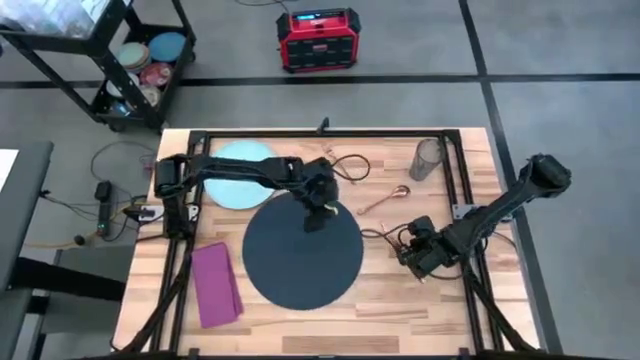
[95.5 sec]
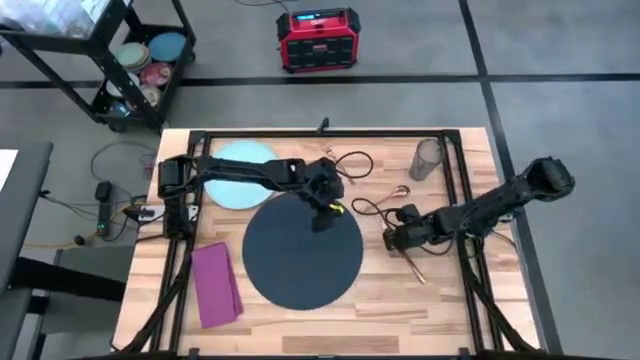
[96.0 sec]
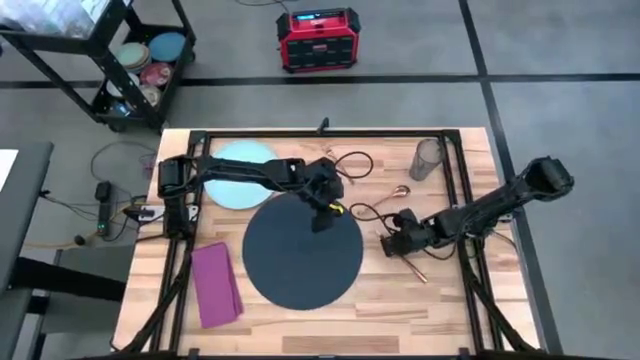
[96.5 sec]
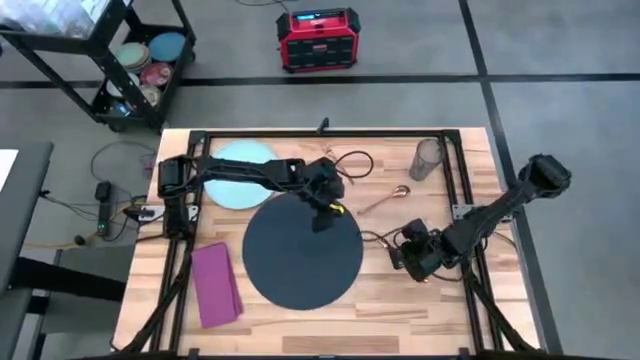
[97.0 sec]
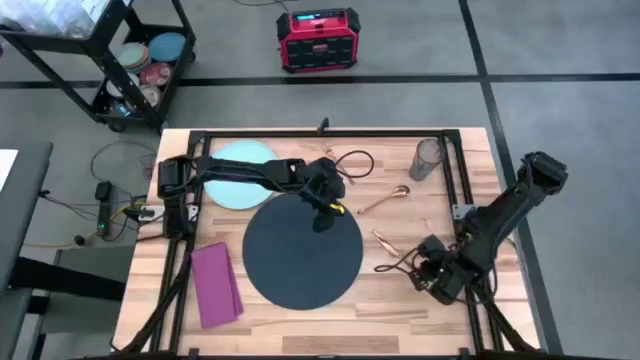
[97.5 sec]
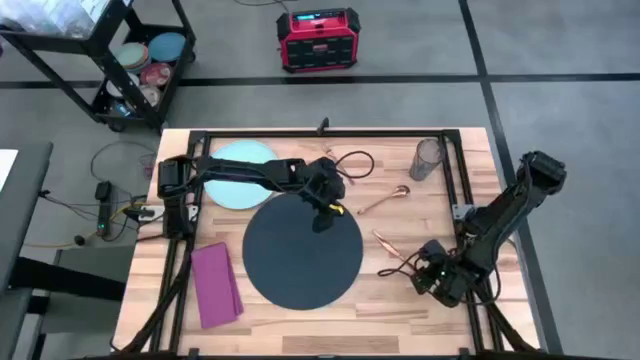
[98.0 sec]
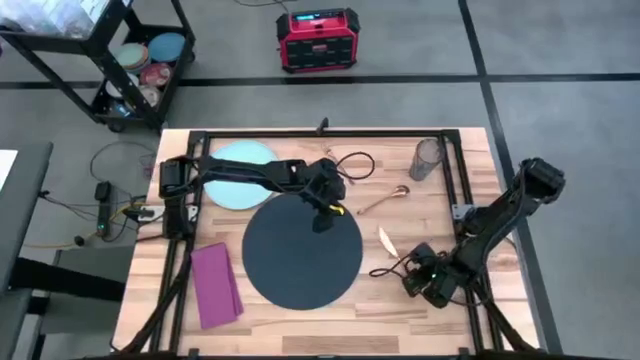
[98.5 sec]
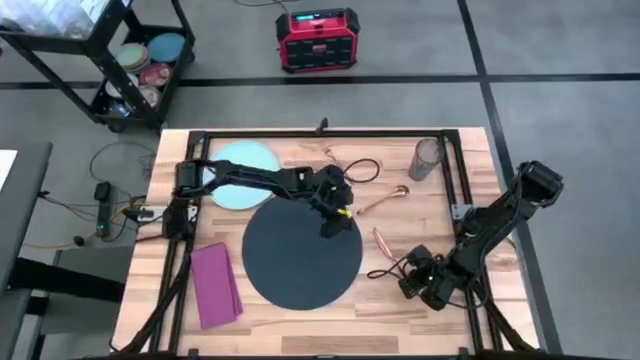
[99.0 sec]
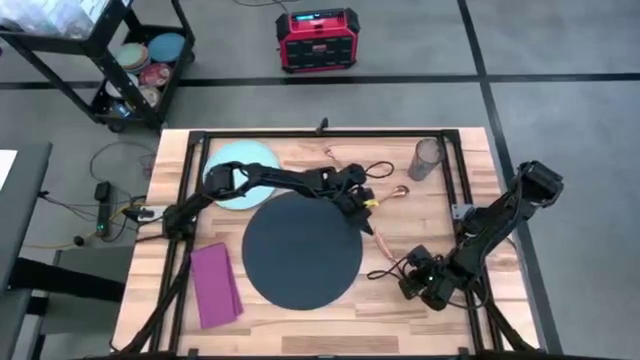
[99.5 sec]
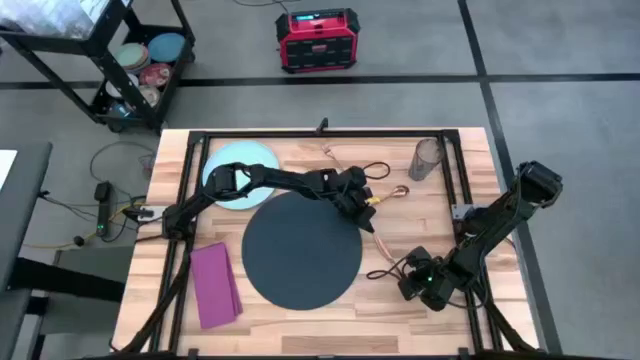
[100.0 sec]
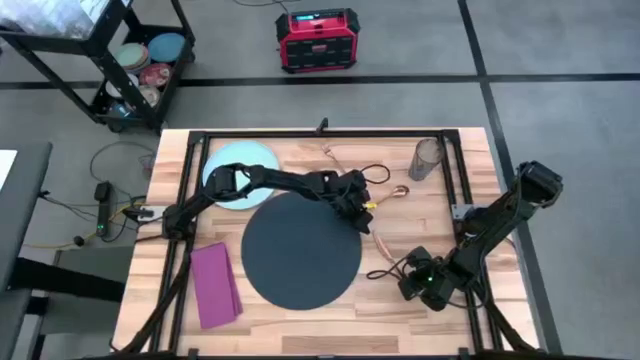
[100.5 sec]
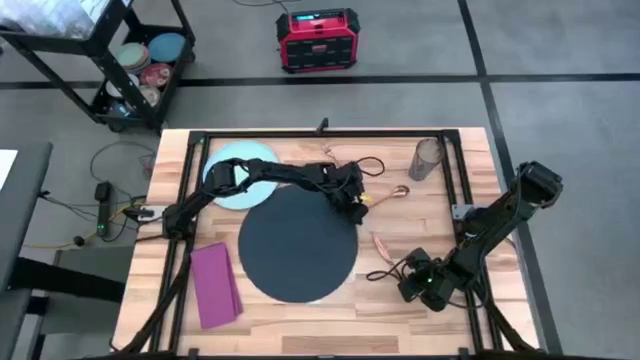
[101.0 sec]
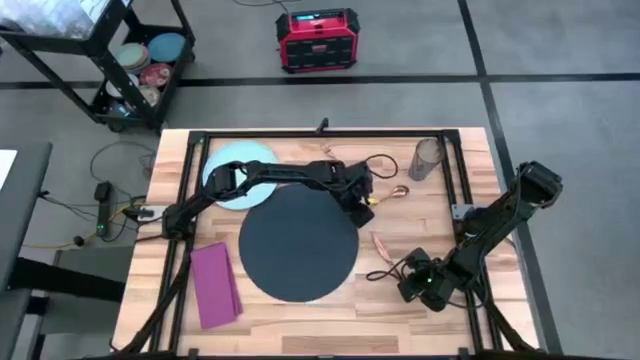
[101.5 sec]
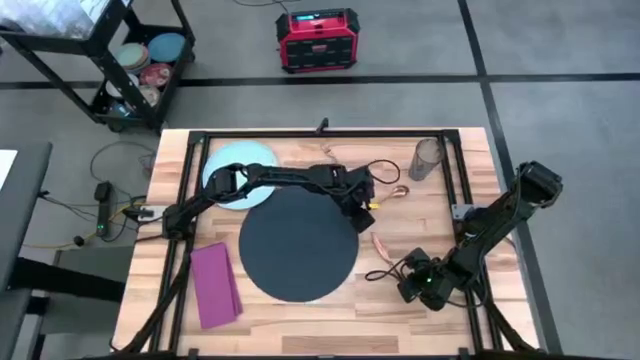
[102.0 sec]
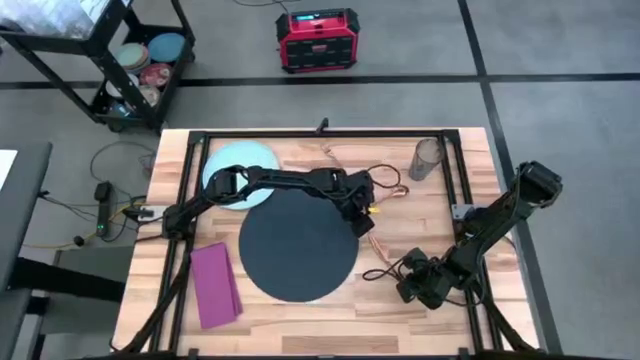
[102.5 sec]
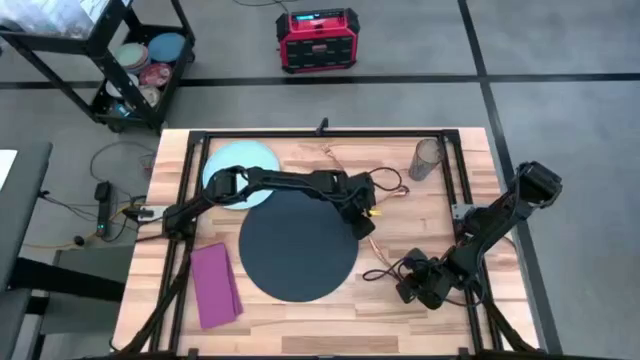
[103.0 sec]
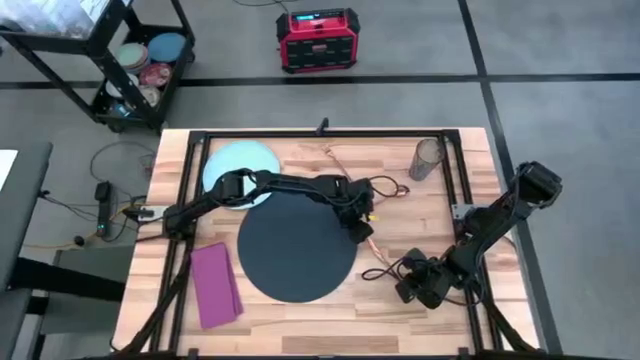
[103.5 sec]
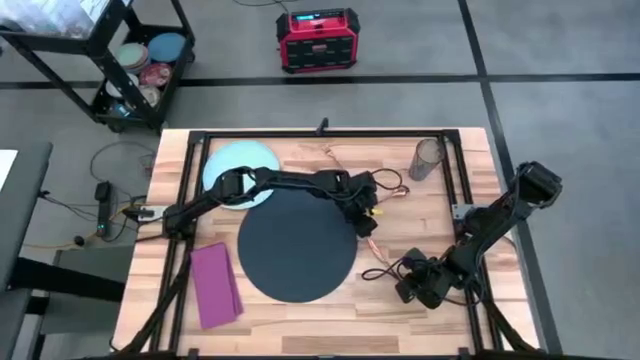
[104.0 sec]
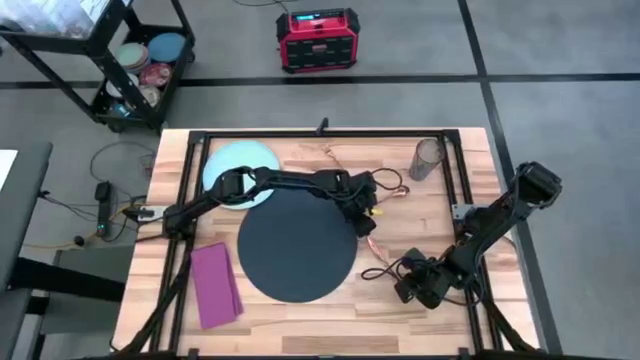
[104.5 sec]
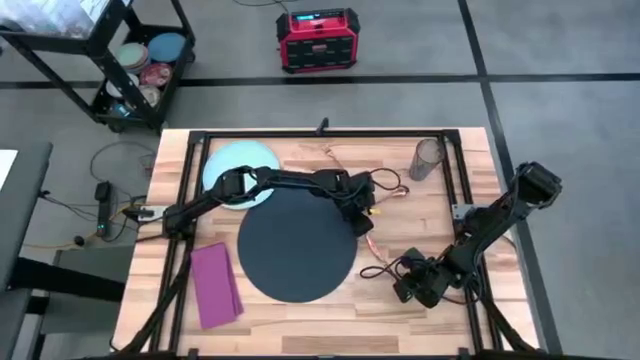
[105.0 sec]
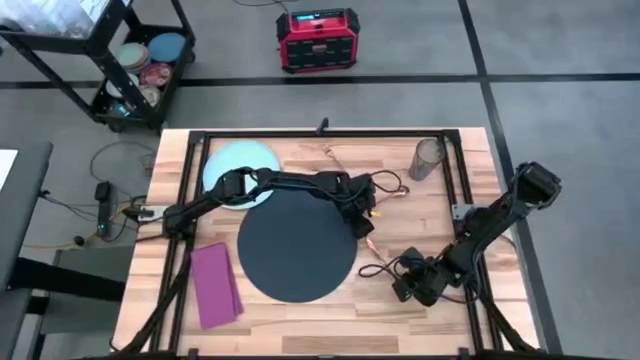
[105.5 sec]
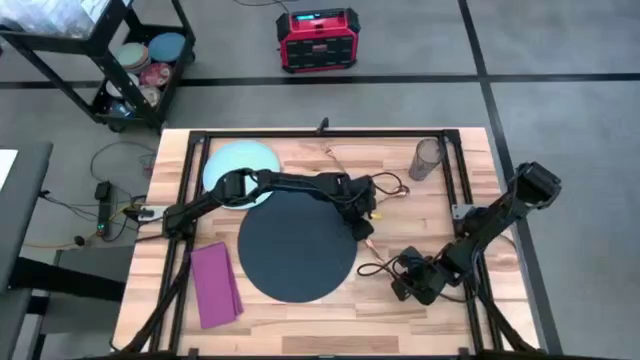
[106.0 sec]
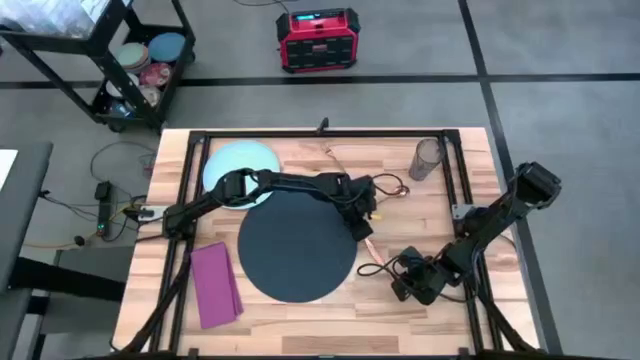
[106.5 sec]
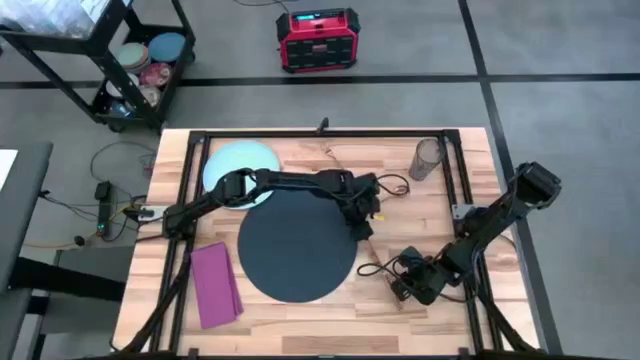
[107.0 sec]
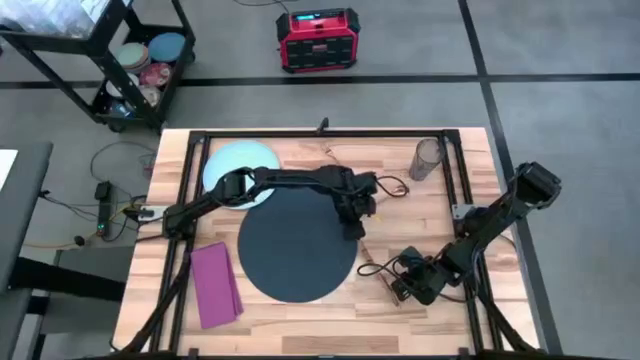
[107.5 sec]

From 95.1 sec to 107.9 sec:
Task: Set table place
Put the brown table knife on the blue table mat

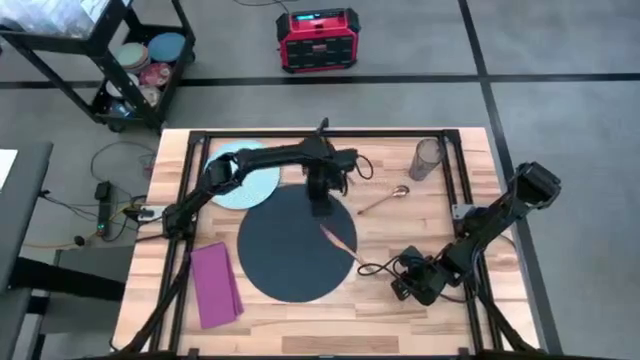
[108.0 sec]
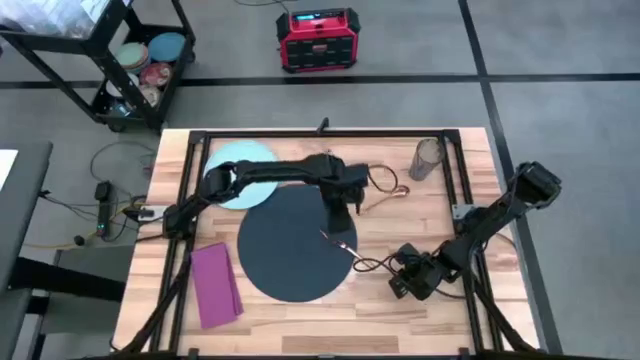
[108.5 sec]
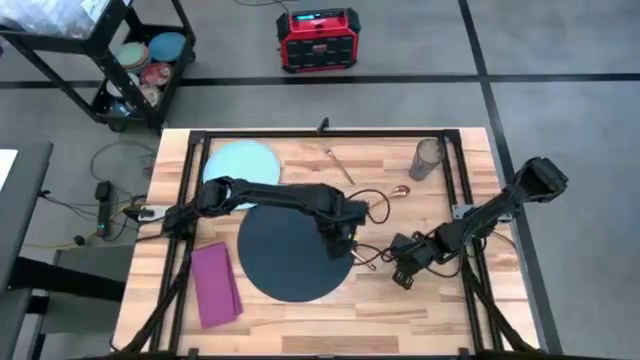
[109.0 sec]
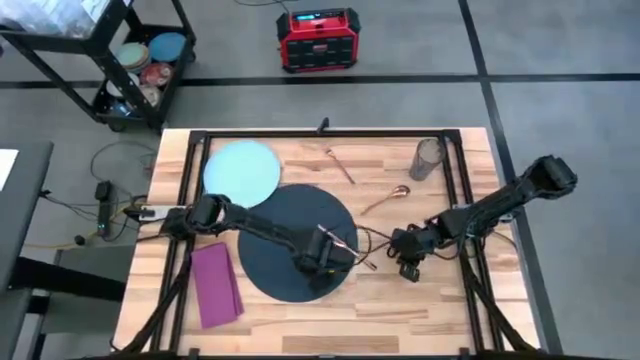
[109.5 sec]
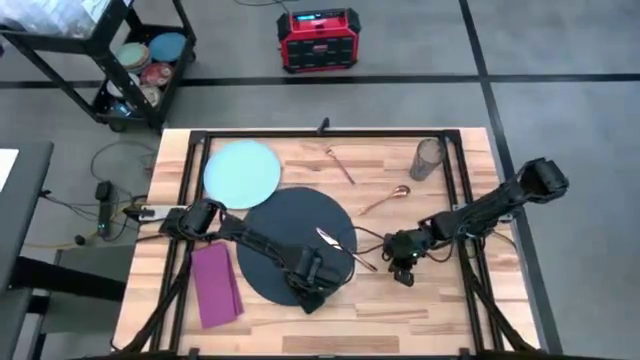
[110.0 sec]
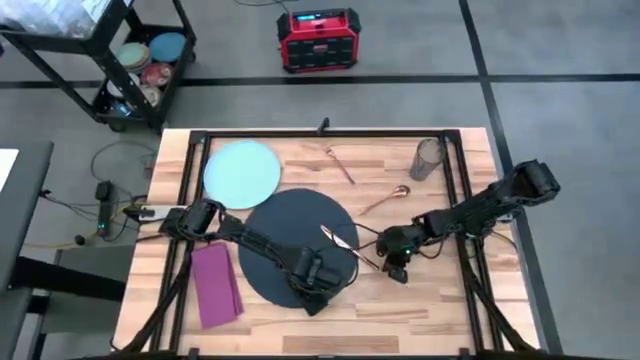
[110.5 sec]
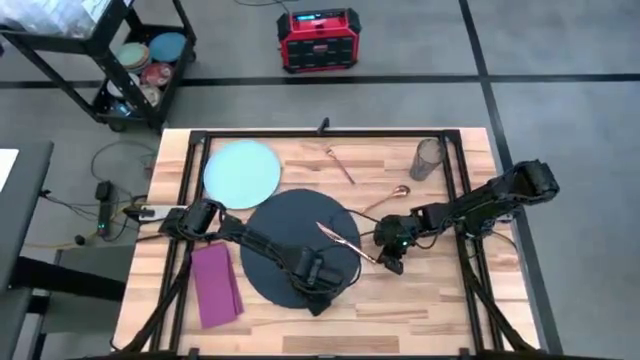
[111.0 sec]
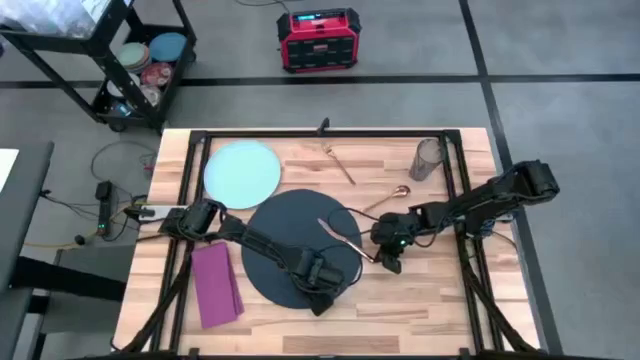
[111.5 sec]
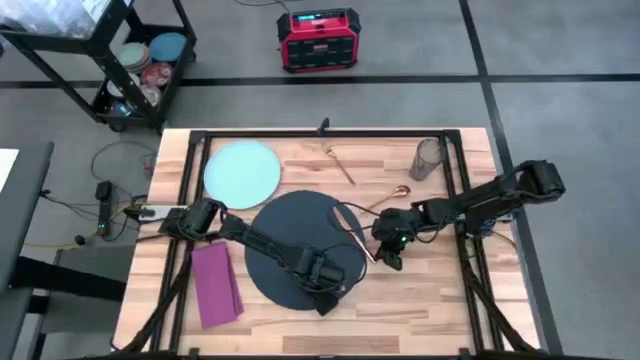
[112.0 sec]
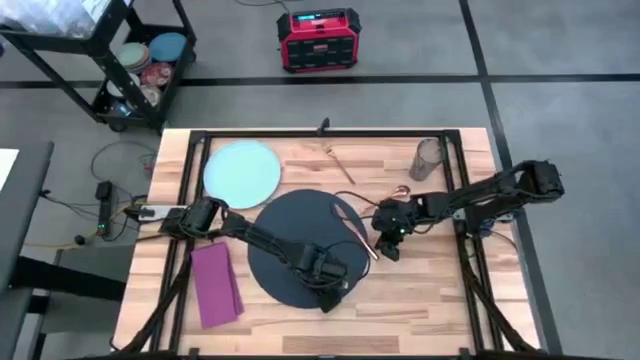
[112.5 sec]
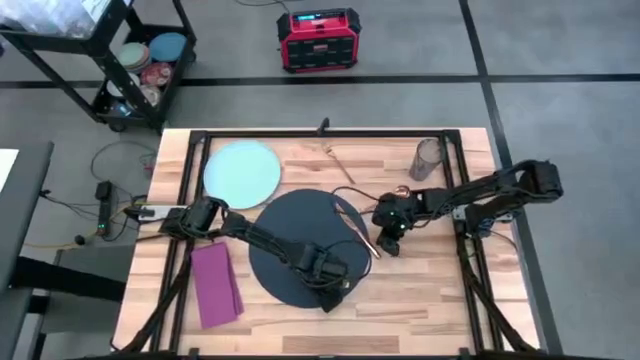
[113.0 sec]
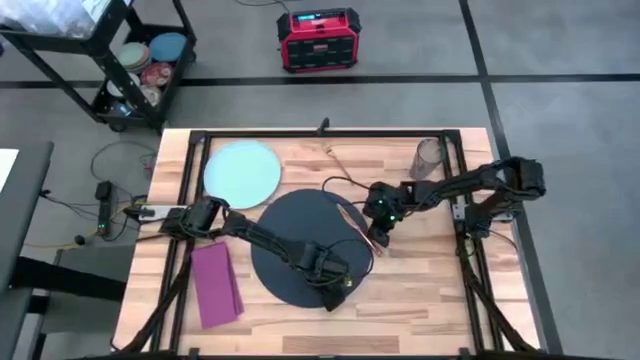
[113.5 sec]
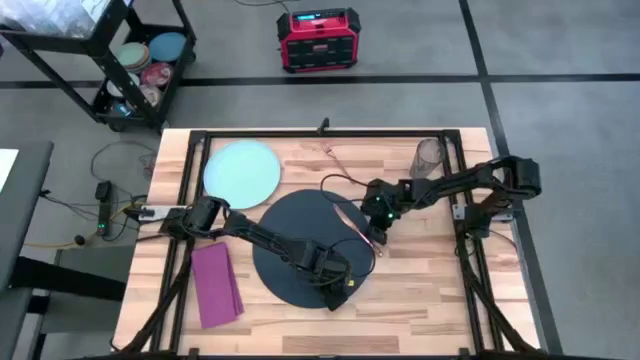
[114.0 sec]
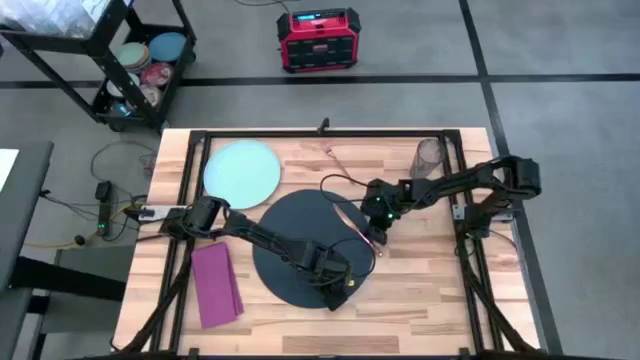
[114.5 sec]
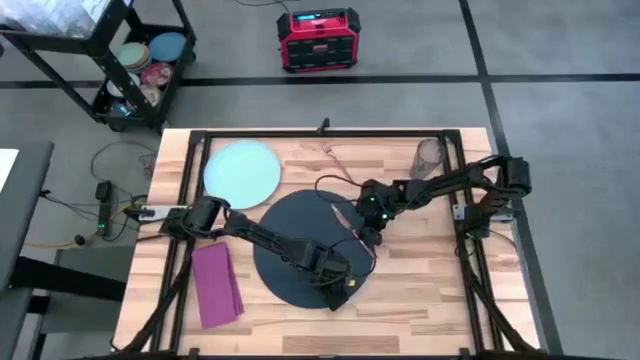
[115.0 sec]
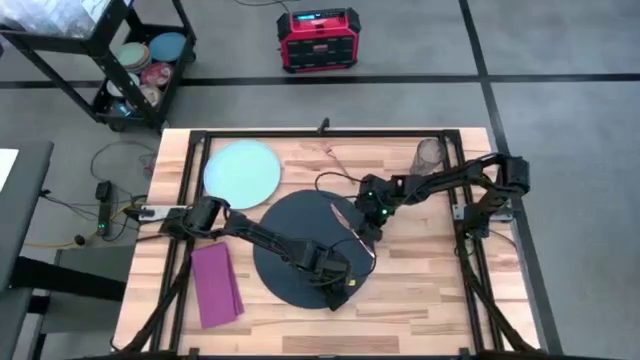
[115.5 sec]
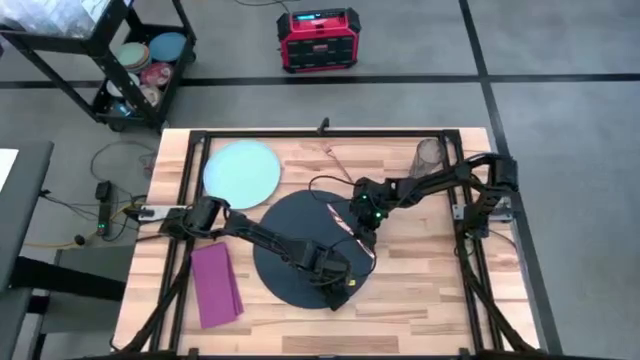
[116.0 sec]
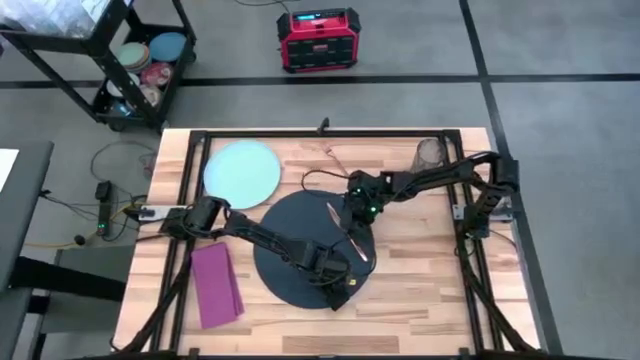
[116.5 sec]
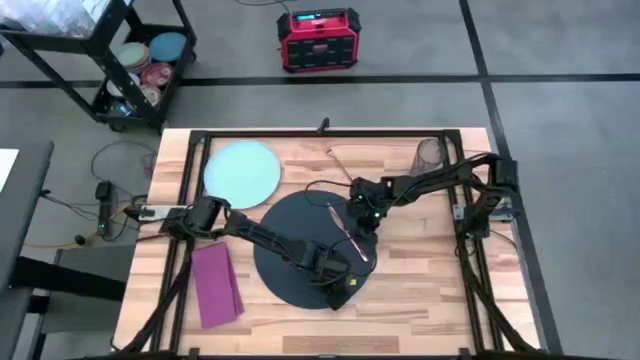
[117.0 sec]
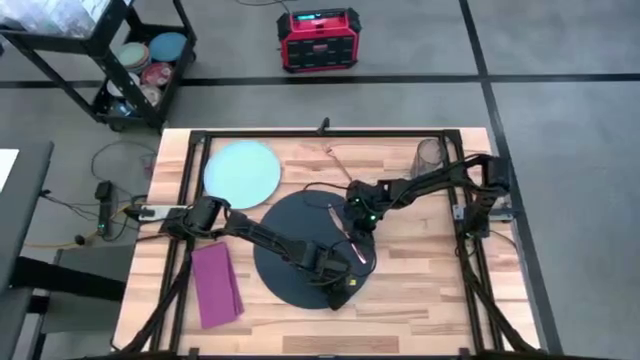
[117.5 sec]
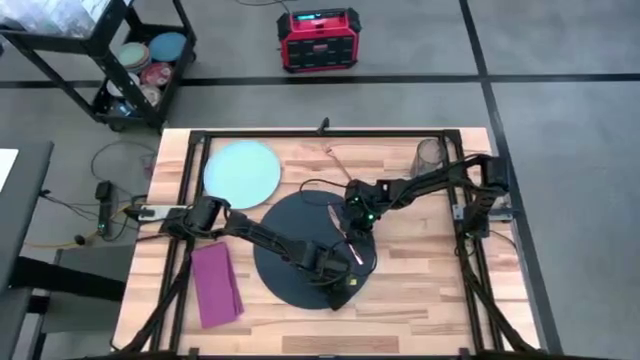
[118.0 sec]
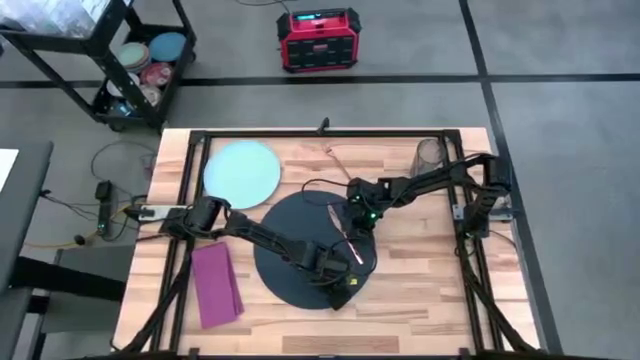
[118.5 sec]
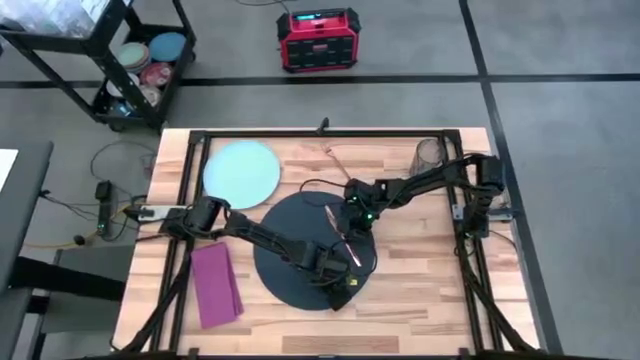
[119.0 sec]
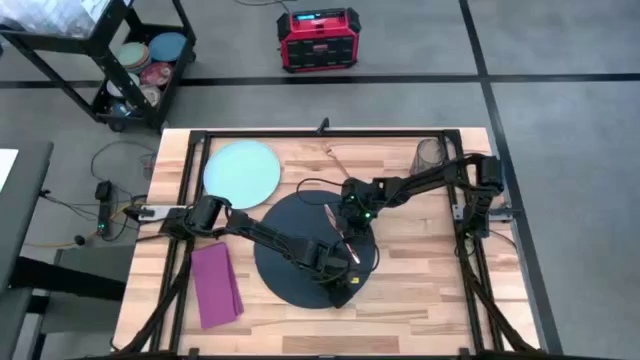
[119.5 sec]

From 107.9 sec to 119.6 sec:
Put the brown table knife on the blue table mat
